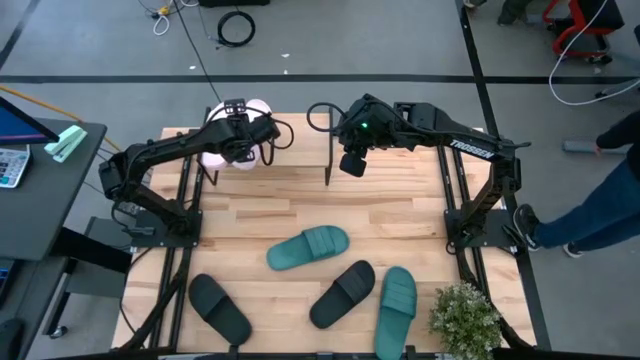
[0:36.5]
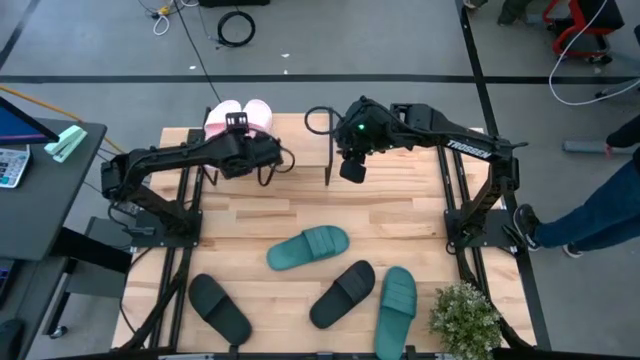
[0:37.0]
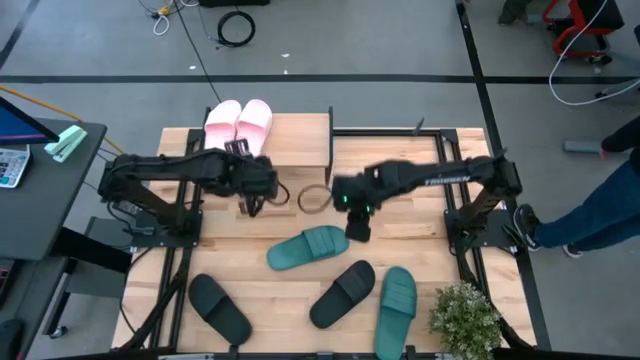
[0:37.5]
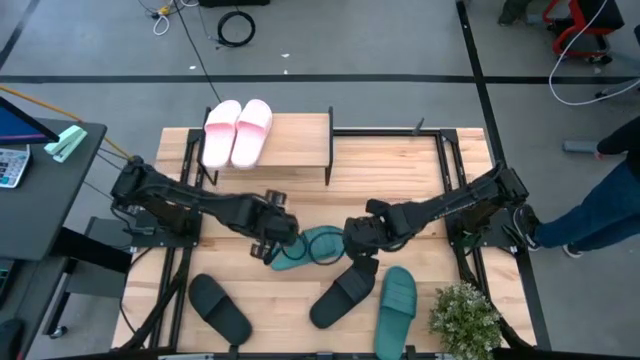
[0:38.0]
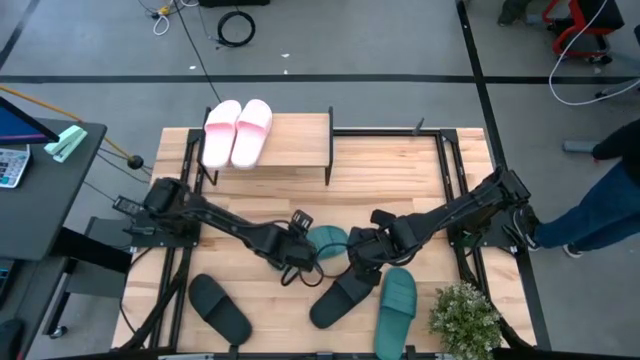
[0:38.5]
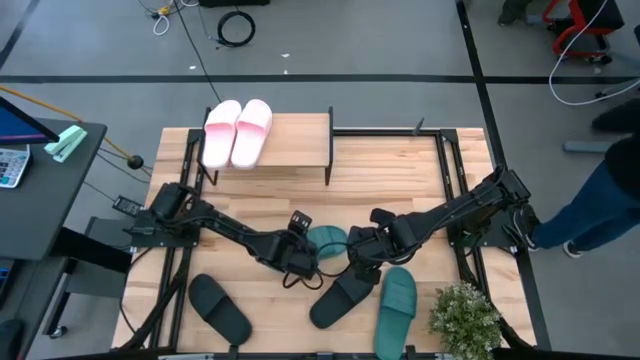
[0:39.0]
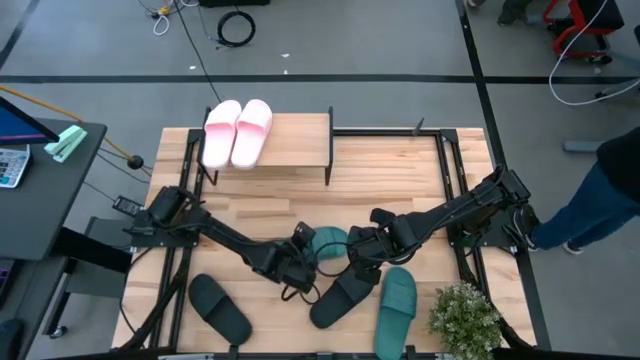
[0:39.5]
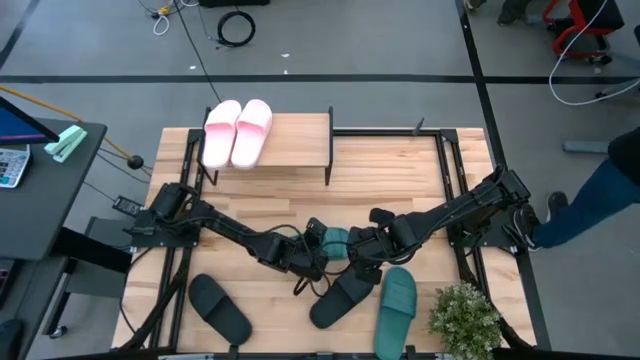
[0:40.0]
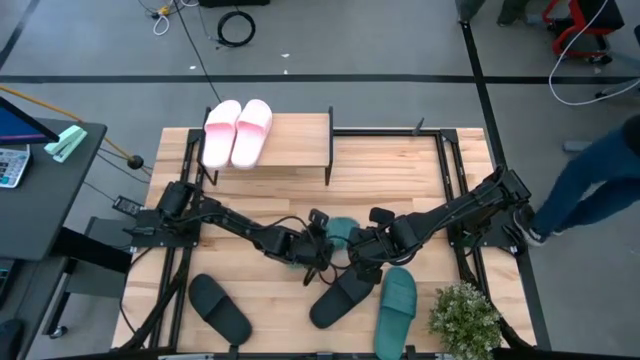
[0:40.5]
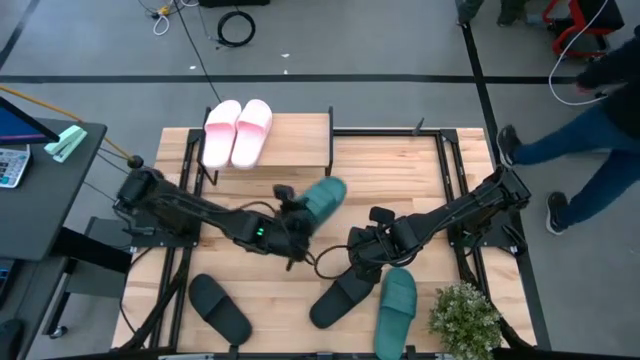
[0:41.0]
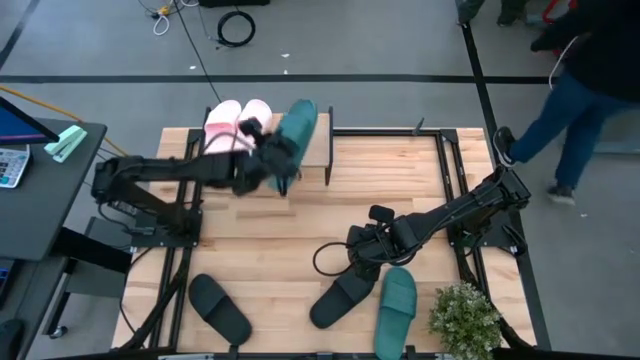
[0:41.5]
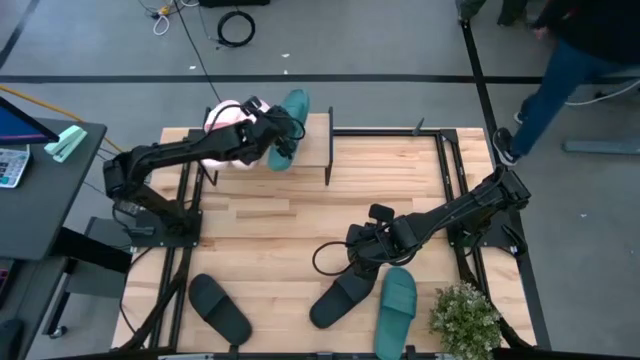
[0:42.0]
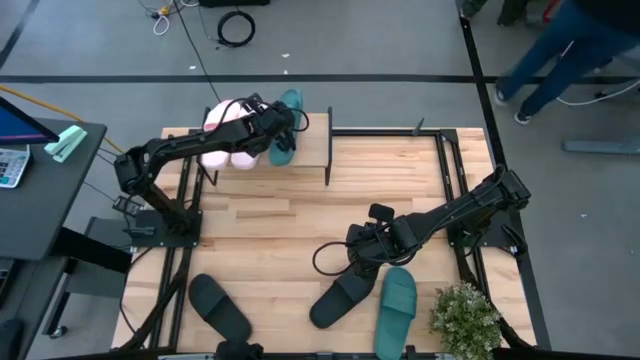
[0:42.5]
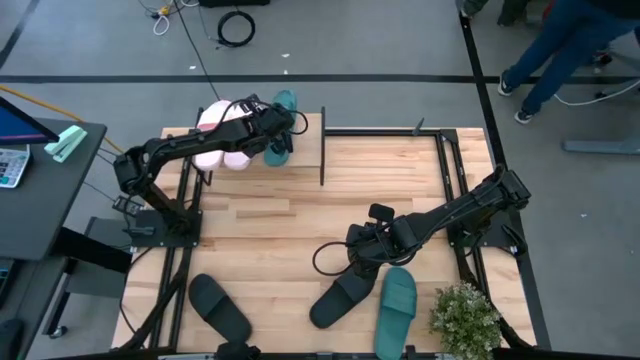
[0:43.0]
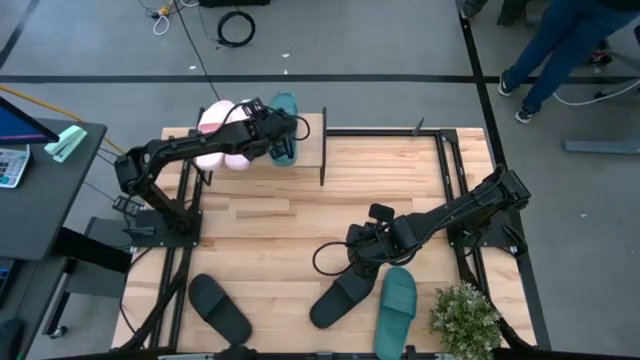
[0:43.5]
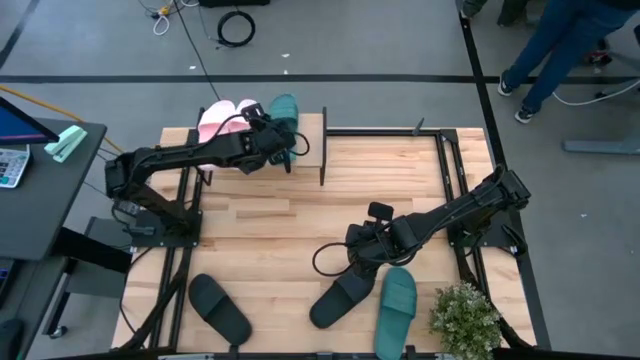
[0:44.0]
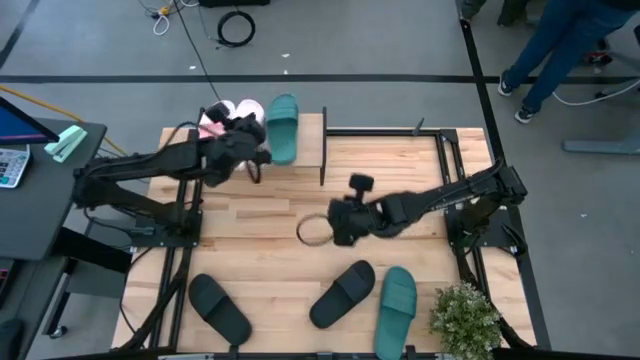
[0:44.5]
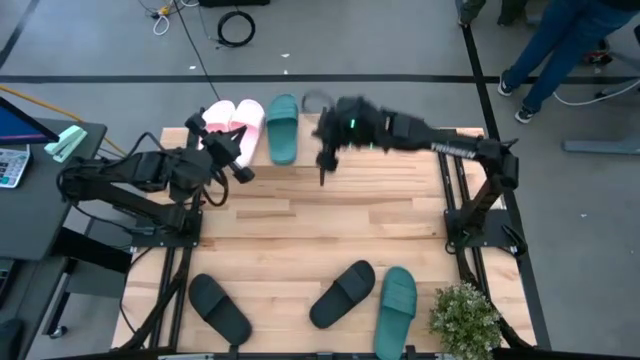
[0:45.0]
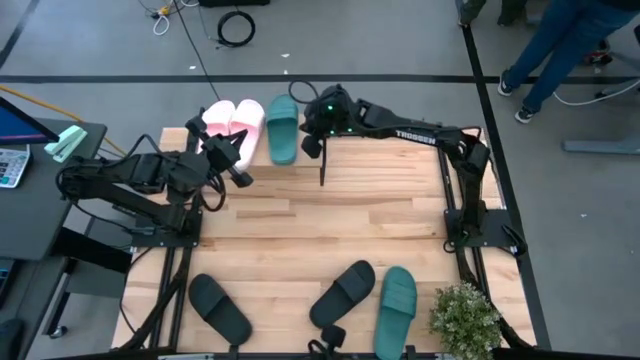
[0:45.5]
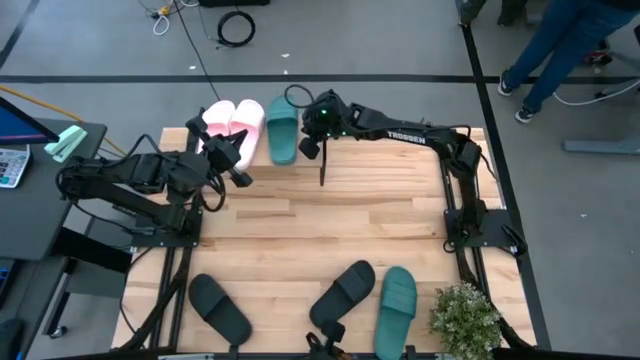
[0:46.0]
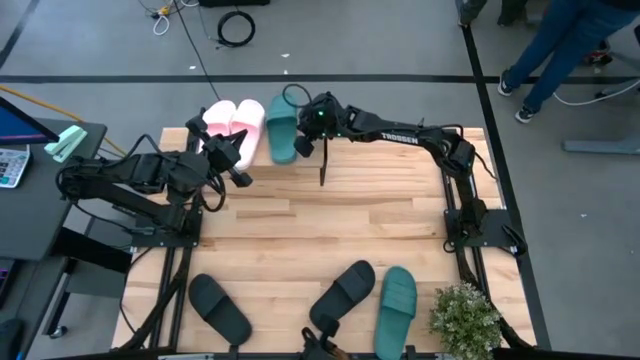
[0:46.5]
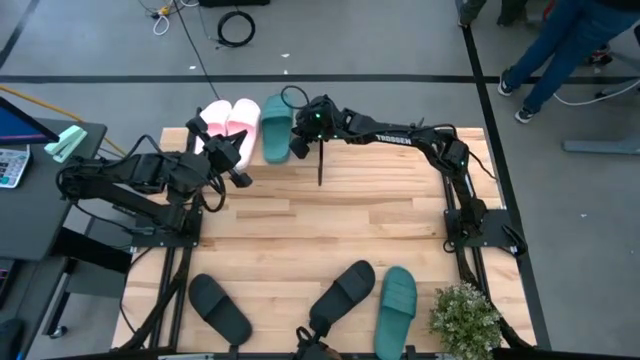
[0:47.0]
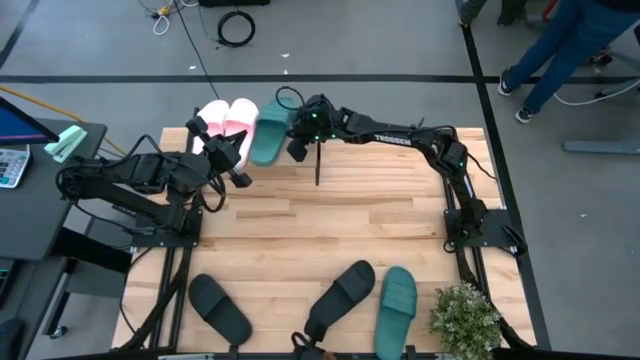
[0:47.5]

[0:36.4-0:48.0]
Task: Pick and place slides into the shelf
Put the top green slide on the shelf

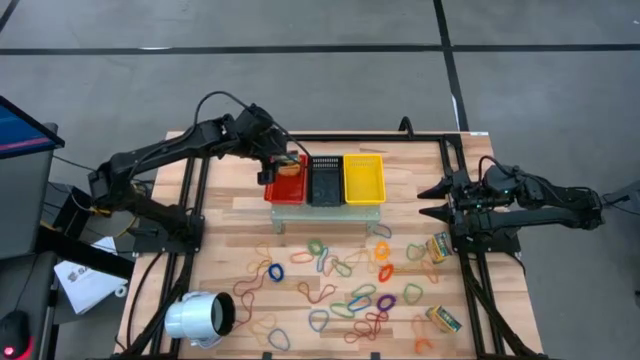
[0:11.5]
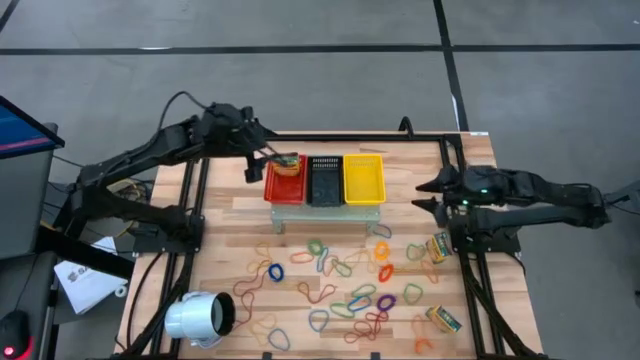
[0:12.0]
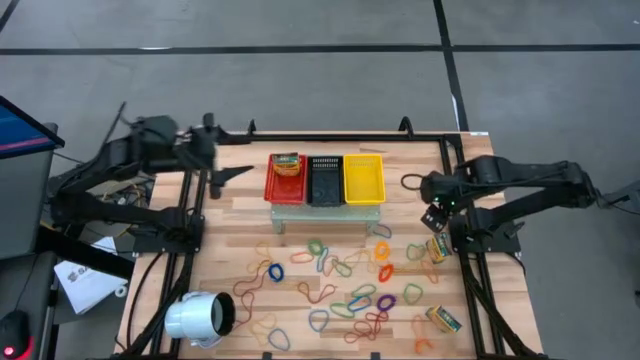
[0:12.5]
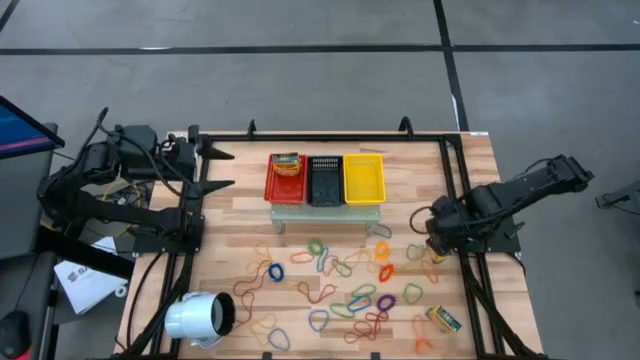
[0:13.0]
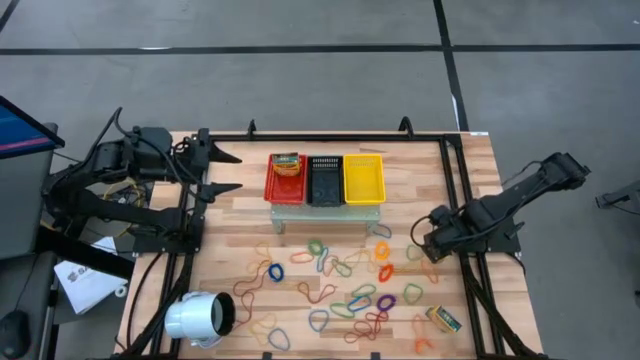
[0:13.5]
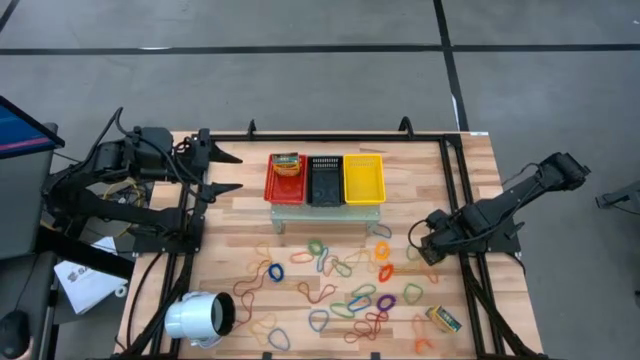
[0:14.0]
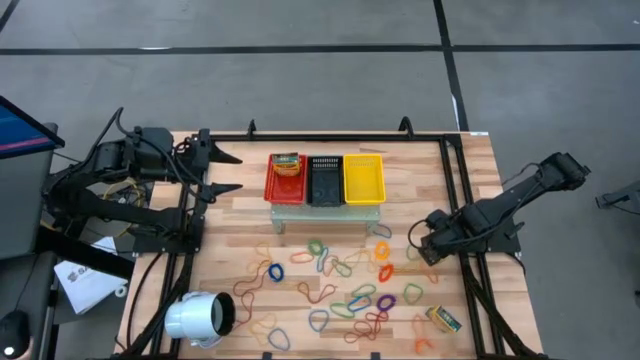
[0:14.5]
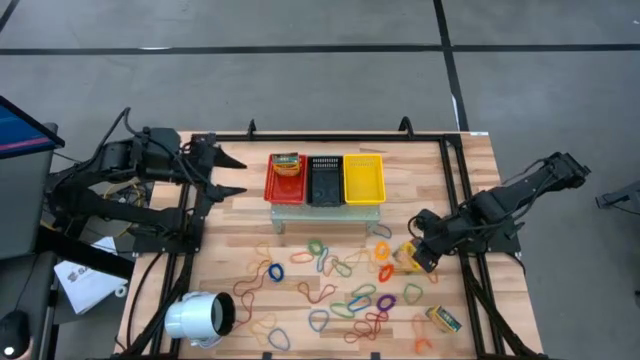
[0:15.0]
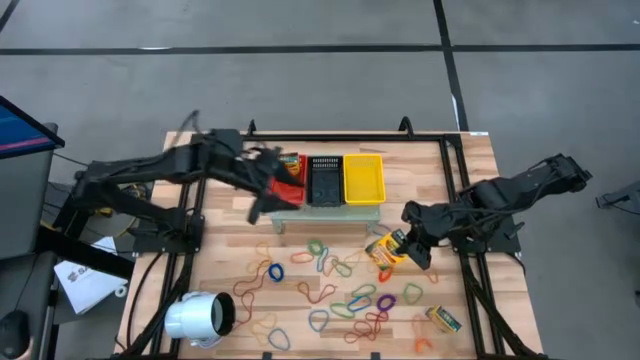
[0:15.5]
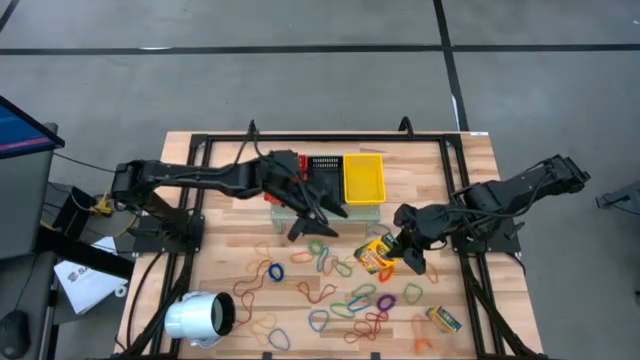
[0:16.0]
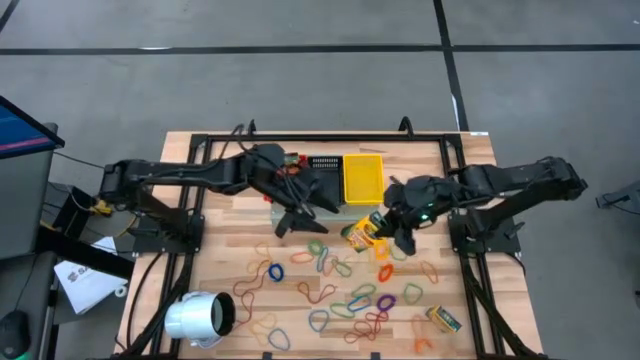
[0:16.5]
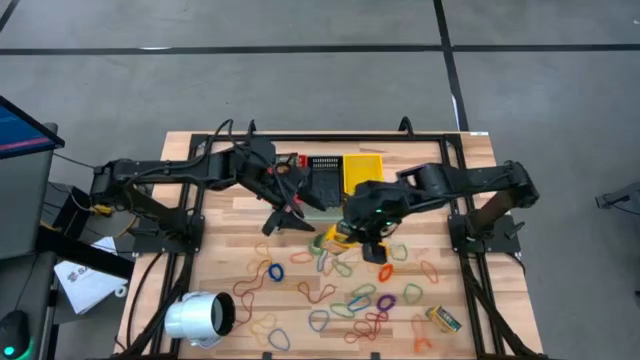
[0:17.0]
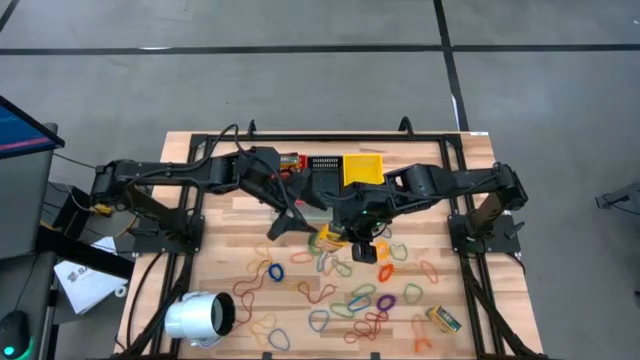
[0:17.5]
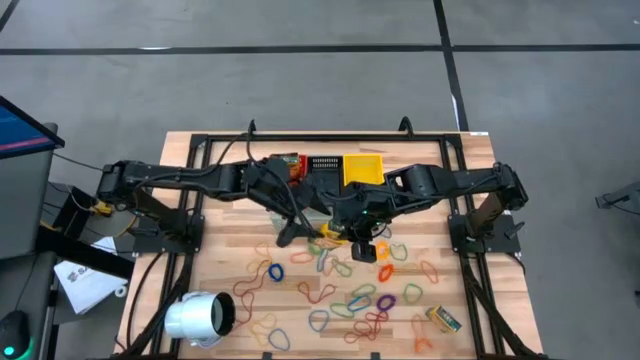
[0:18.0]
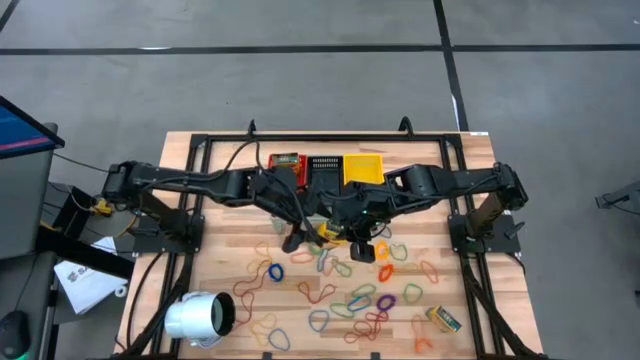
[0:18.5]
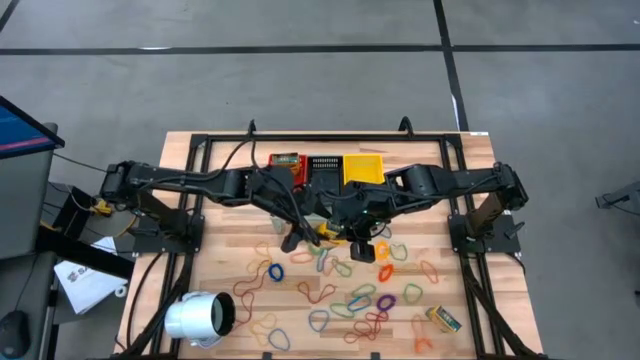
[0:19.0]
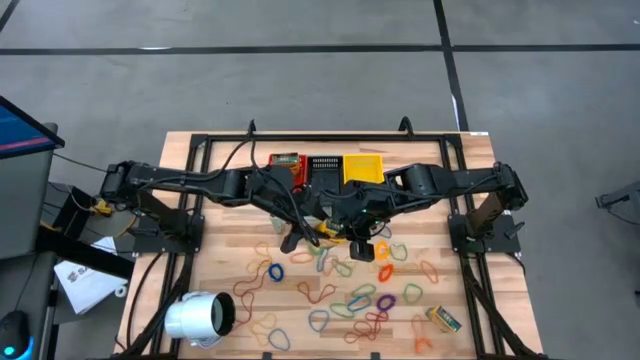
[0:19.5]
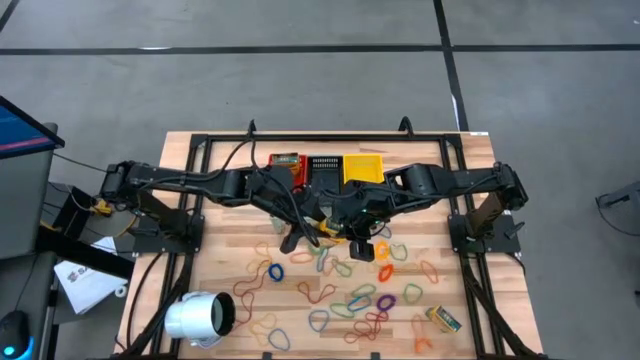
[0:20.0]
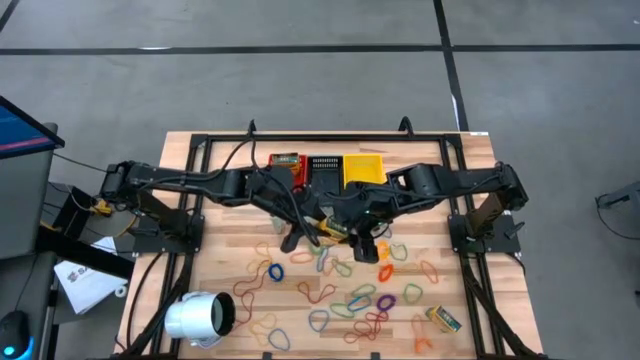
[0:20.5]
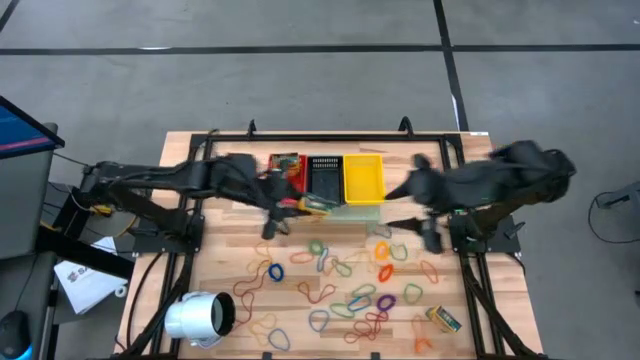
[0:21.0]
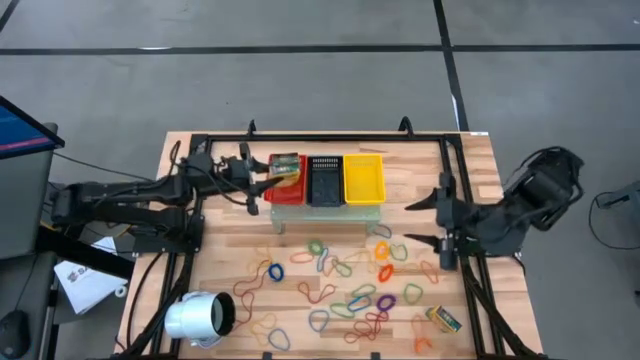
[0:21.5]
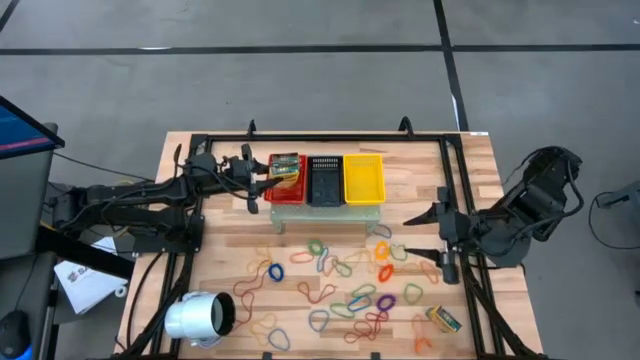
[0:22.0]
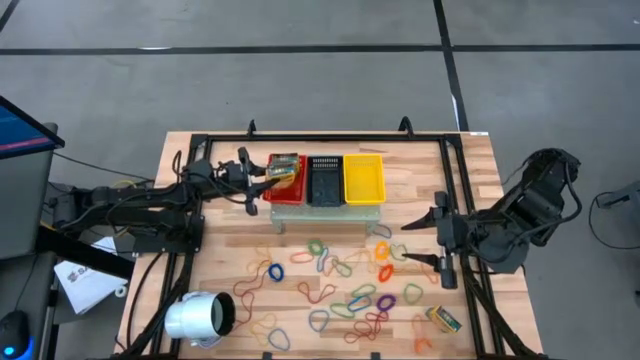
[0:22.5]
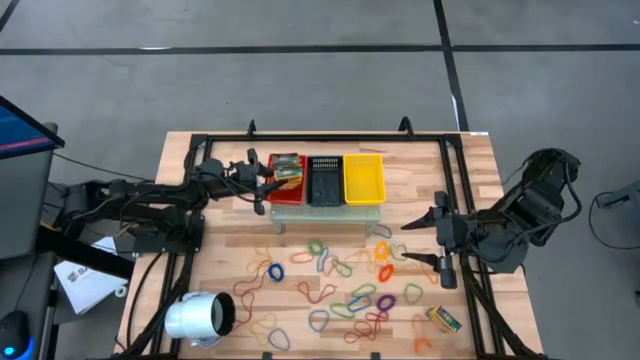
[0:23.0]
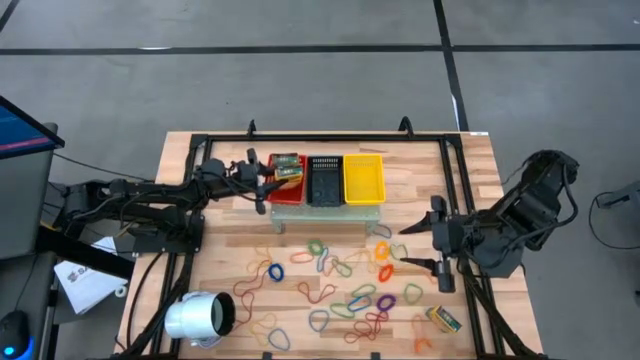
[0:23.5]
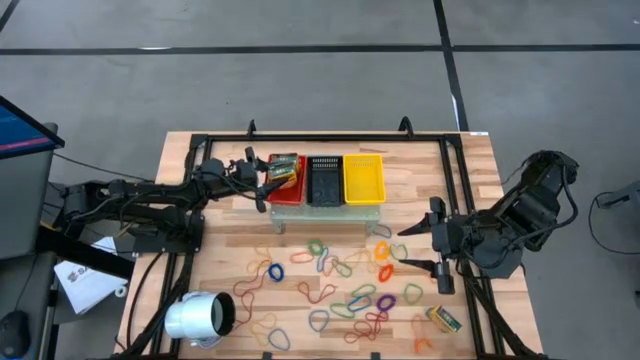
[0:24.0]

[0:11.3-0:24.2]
Task: Pick & Place Office Desk Supplies
Put the crayon box into the red bin on the shelf
